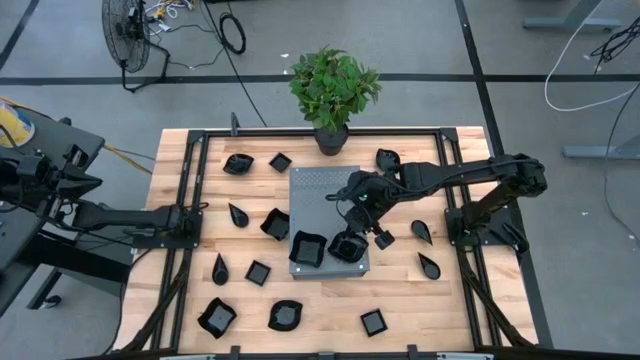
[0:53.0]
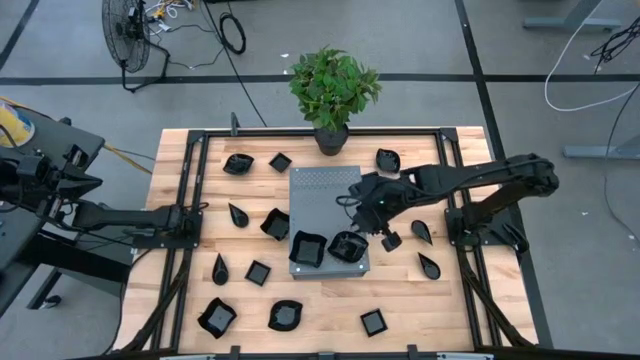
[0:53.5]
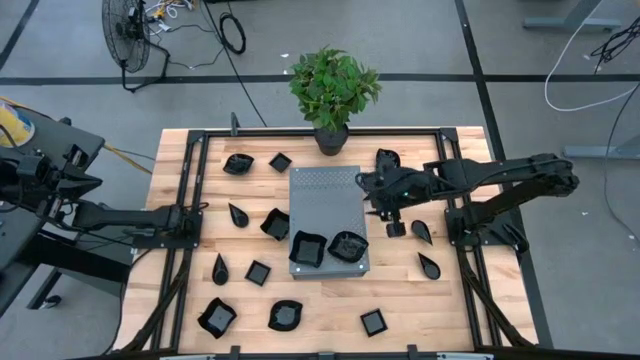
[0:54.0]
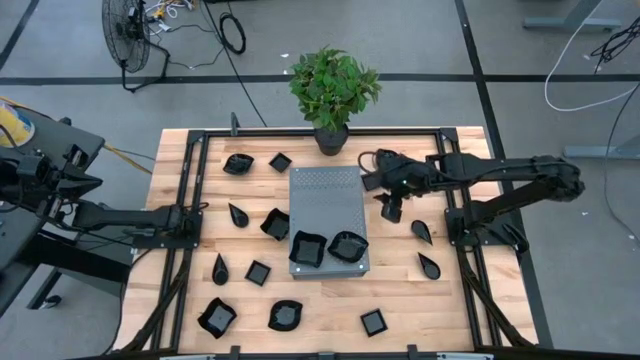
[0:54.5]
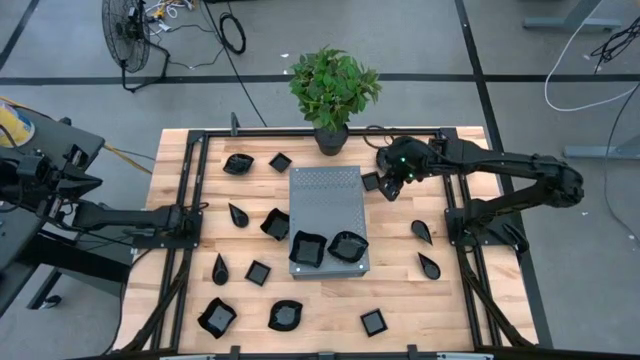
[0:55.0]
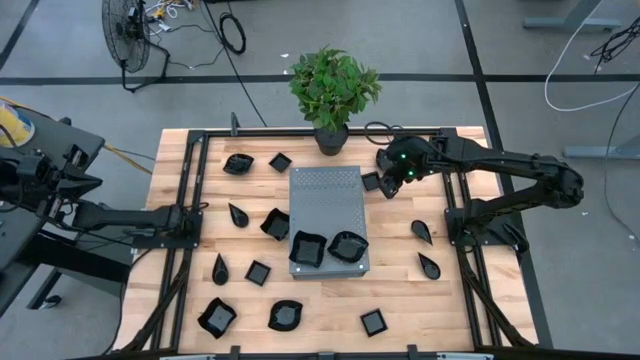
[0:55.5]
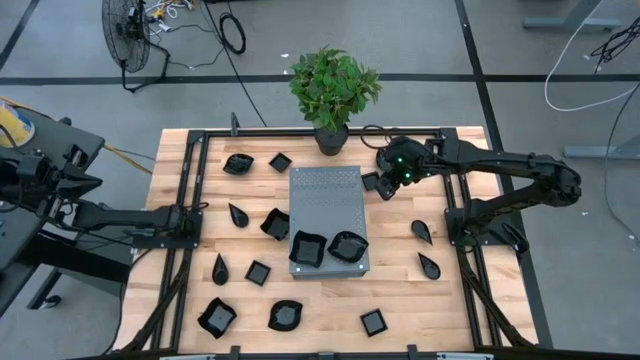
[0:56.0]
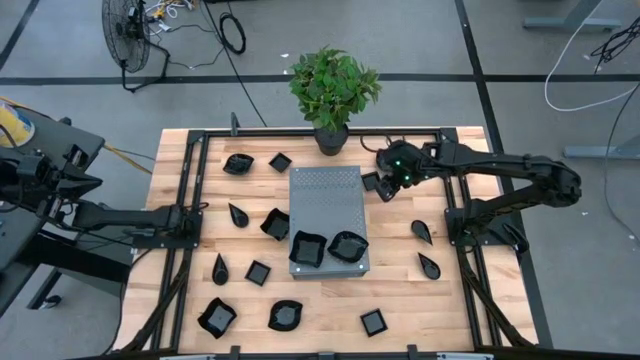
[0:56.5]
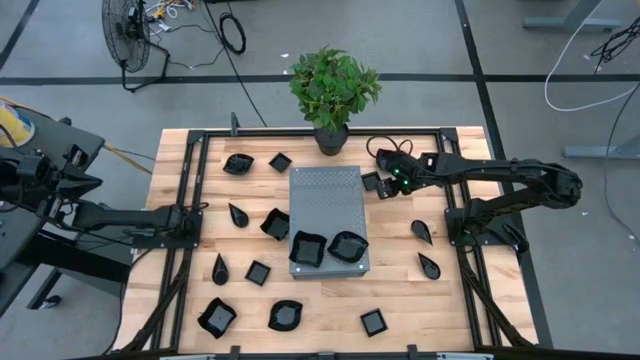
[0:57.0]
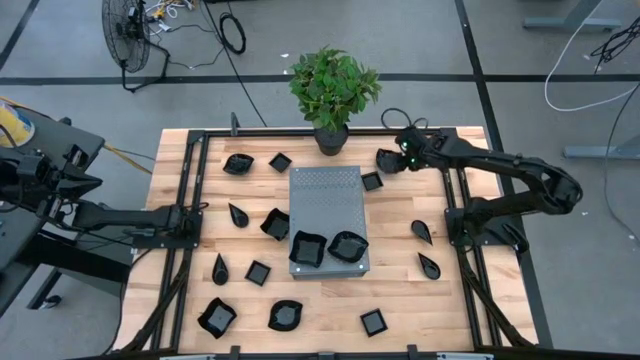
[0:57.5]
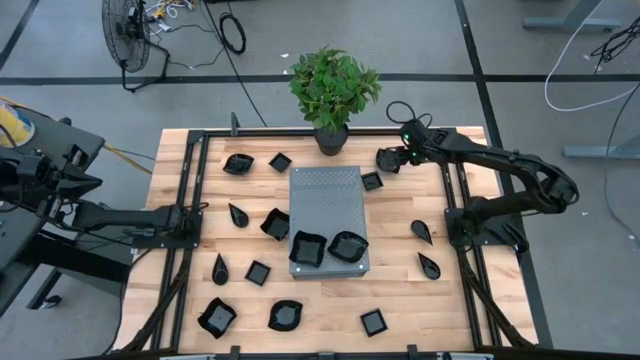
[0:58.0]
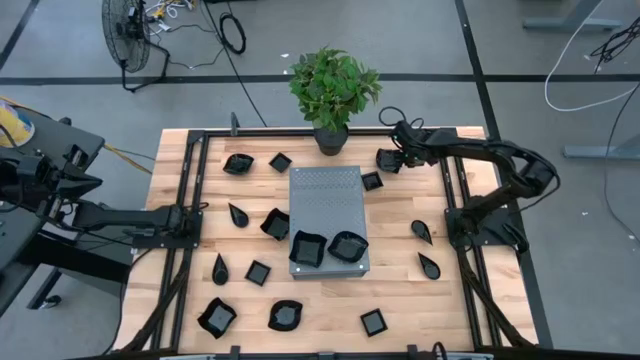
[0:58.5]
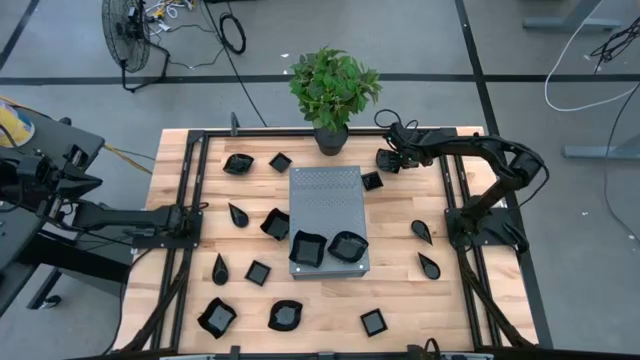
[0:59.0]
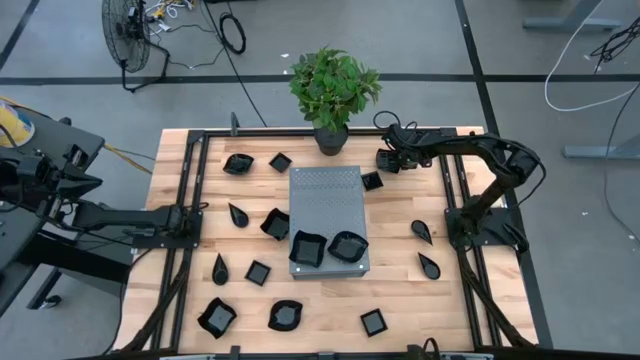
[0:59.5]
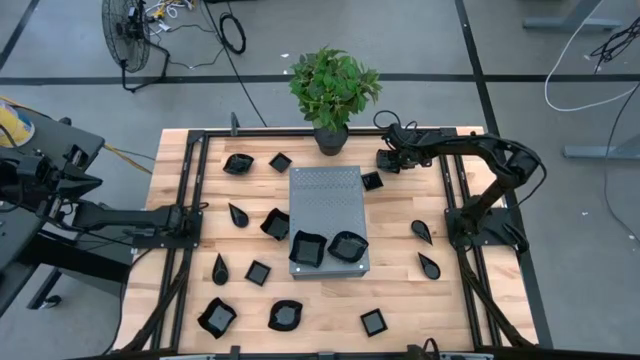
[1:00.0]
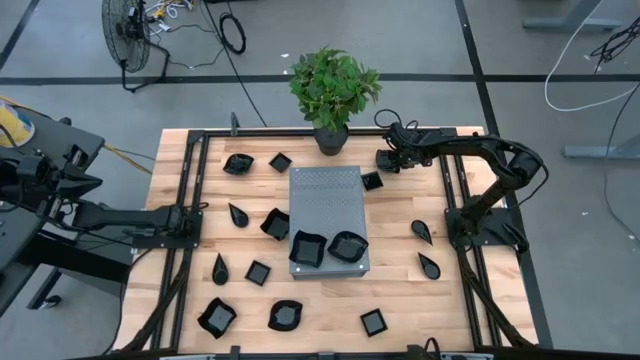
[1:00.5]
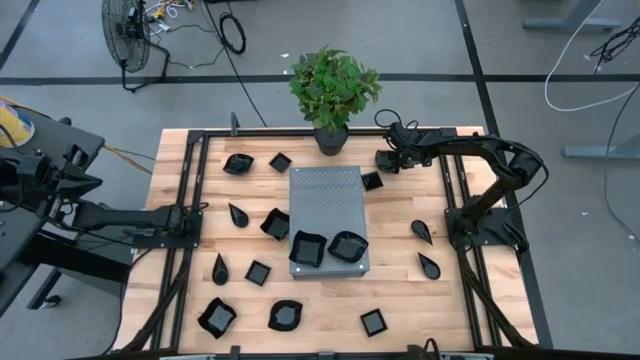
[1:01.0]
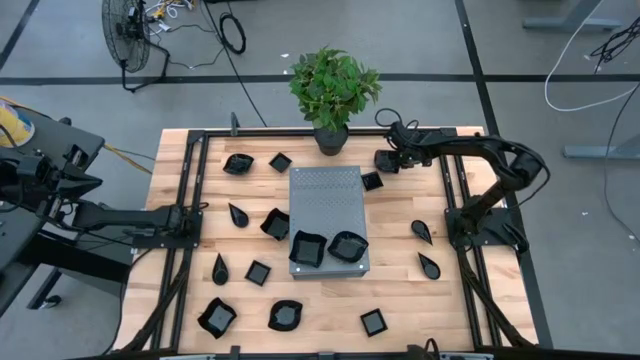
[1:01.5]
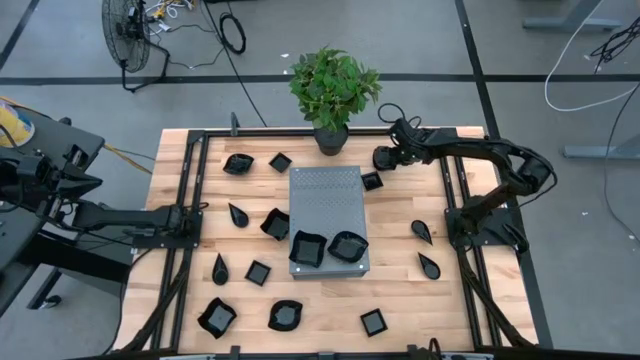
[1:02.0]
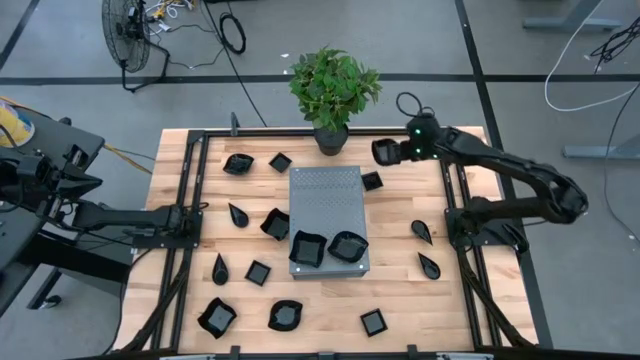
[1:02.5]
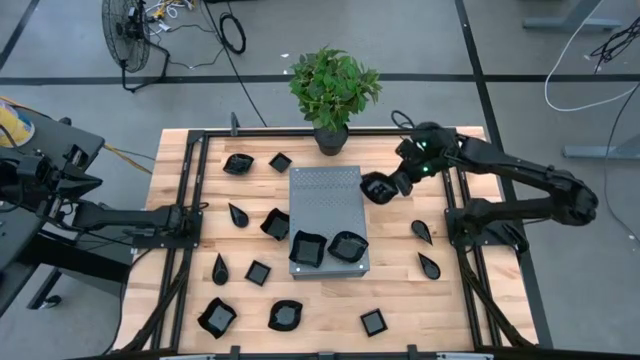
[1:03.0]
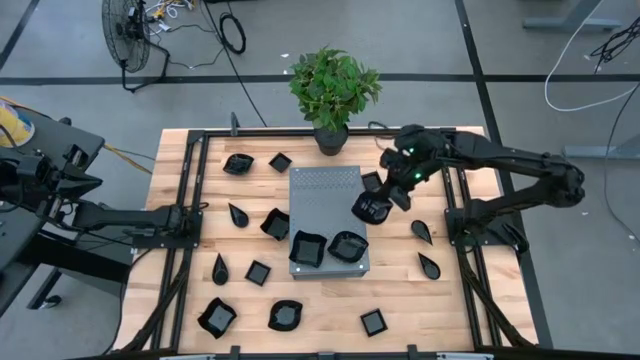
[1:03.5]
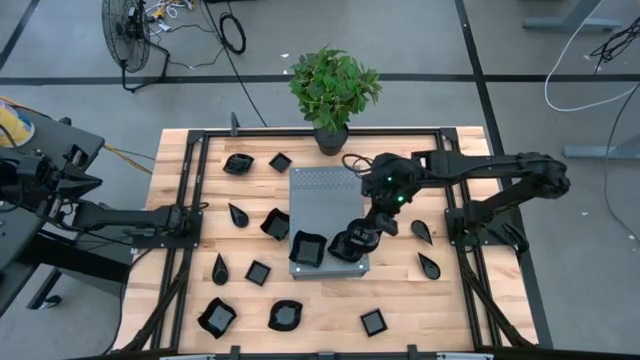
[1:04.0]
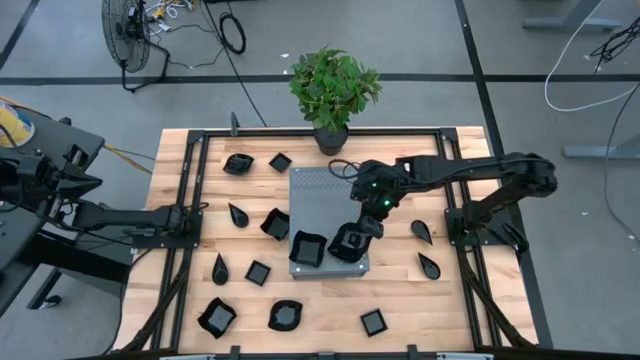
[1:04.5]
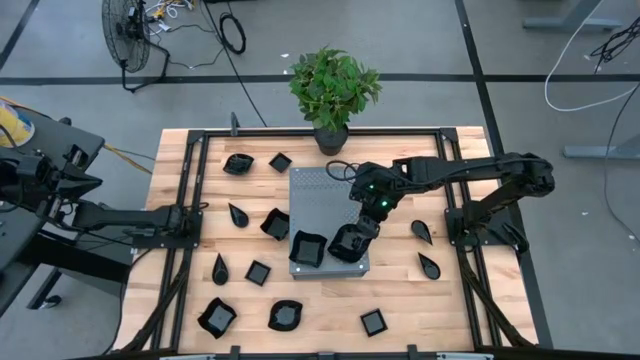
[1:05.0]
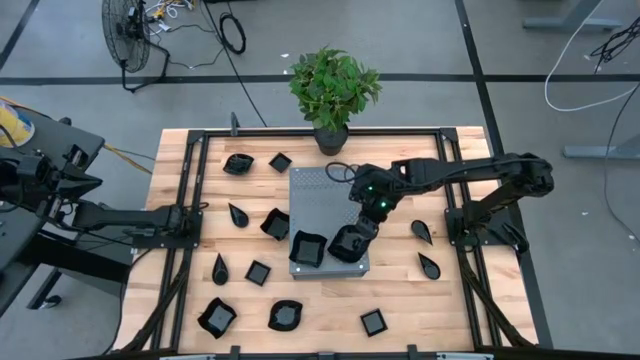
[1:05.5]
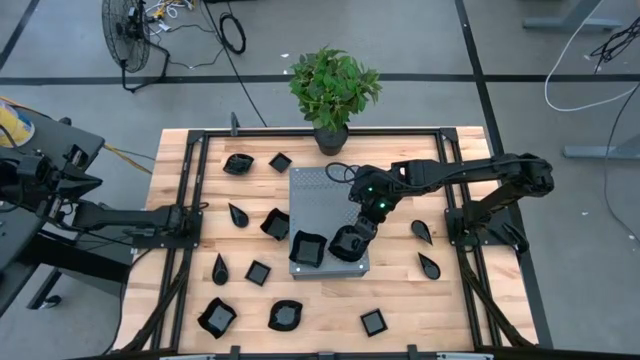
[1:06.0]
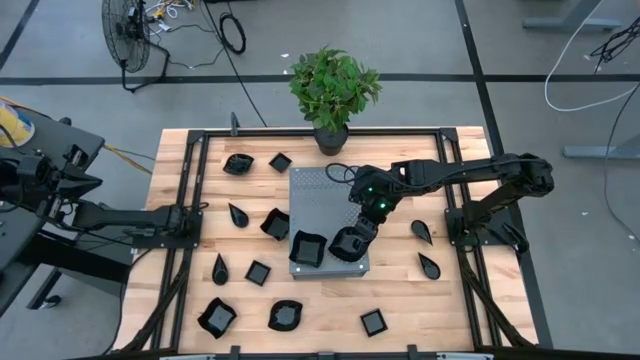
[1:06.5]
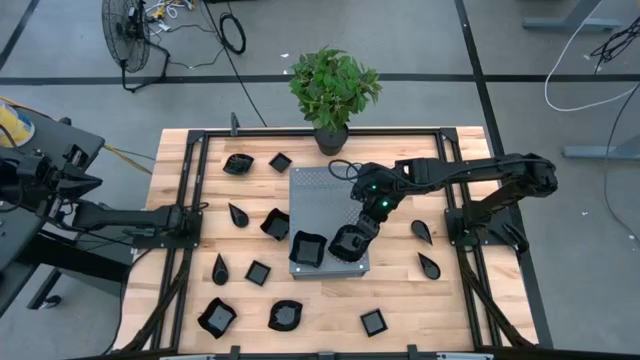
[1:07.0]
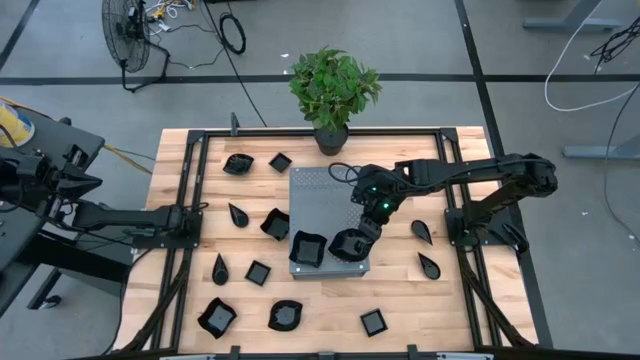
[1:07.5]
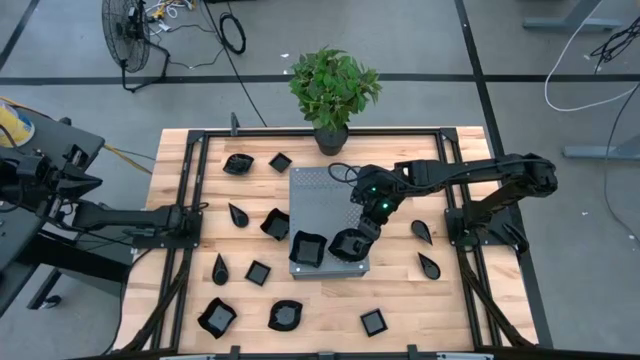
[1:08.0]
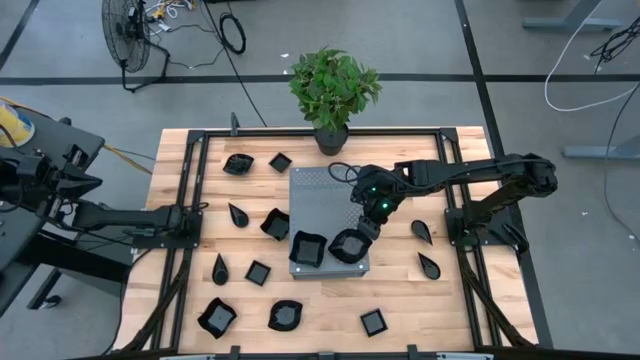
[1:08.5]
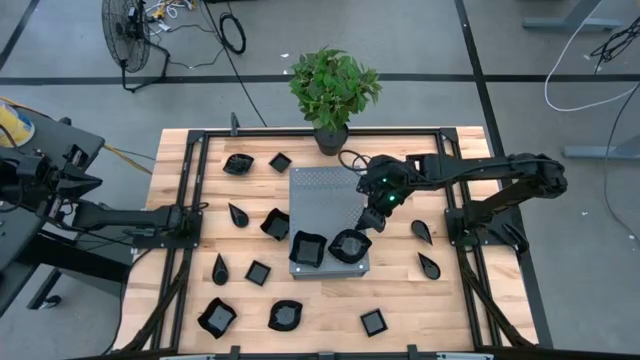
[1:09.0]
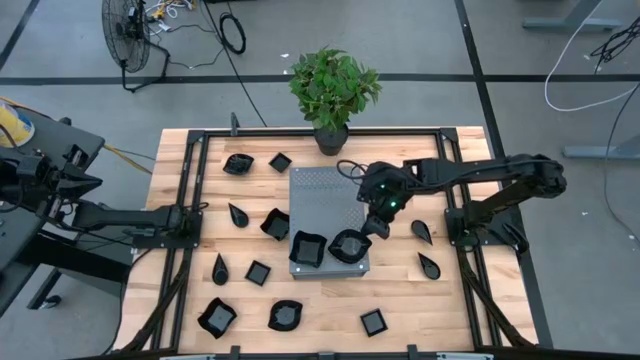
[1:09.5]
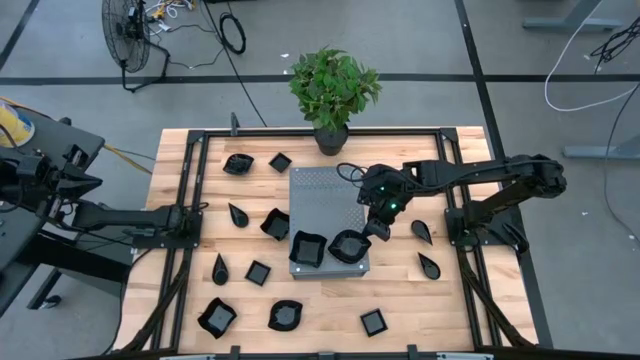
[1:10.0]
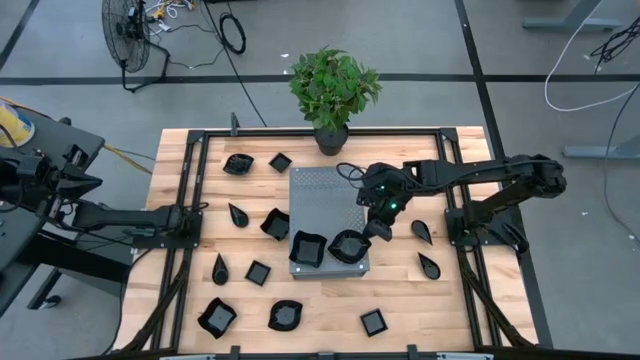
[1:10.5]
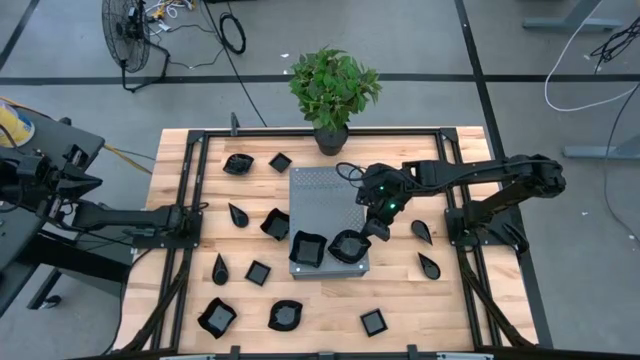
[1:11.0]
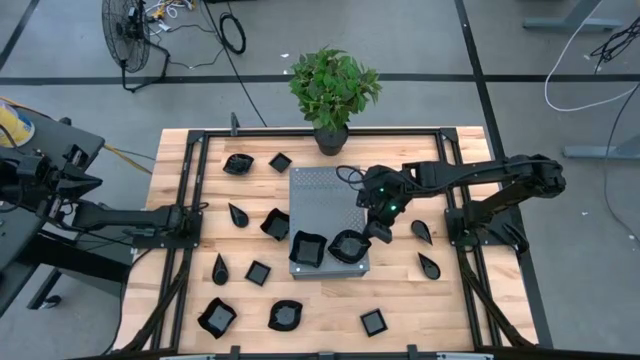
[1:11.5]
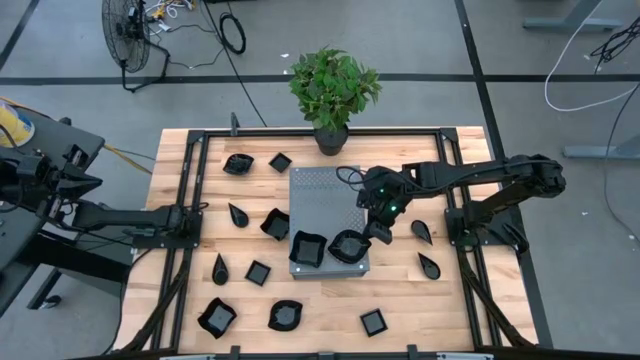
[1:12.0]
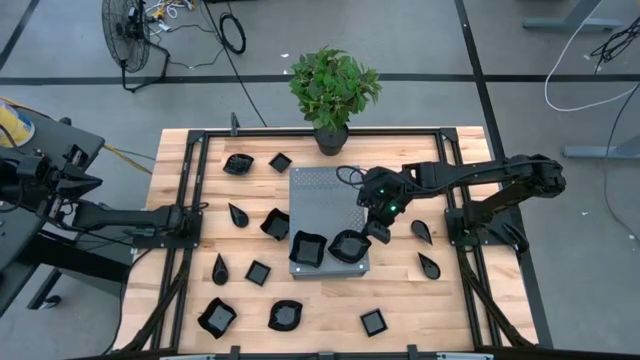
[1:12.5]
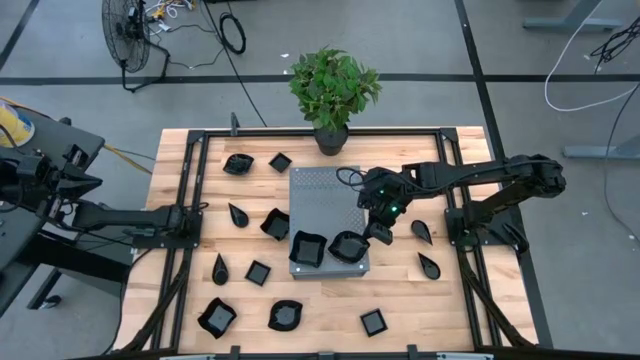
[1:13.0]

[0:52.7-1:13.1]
Task: Pick & Place Mini shaped plates
Stack the black bowl on top of the black bowl on the shelf
